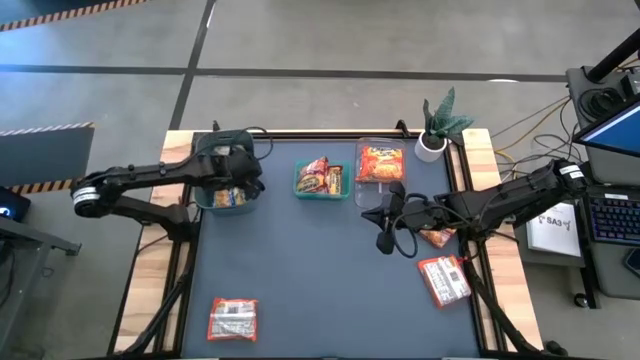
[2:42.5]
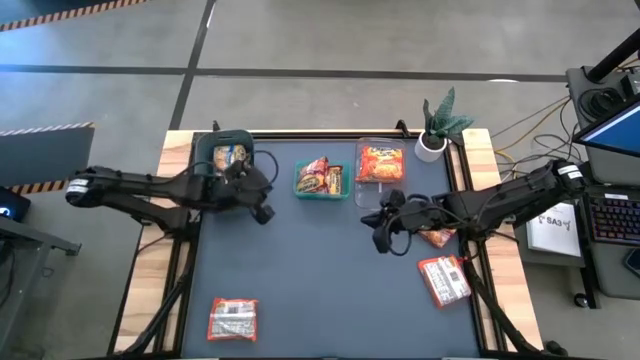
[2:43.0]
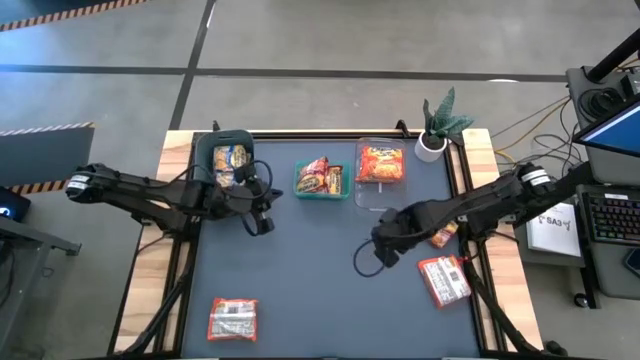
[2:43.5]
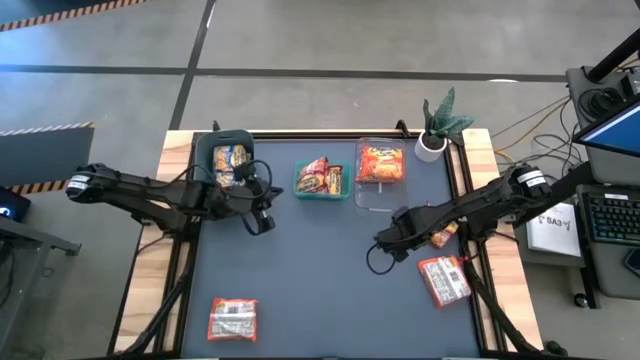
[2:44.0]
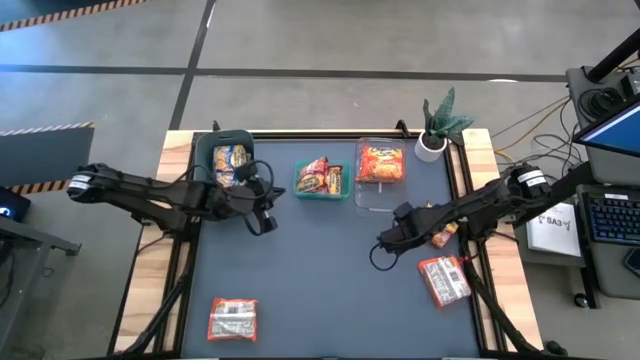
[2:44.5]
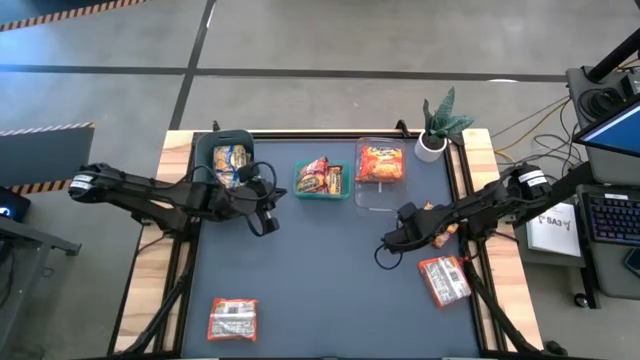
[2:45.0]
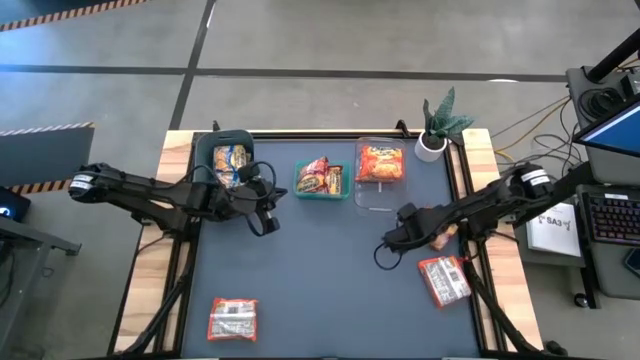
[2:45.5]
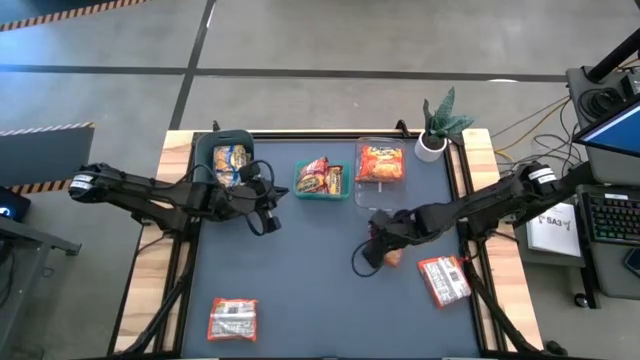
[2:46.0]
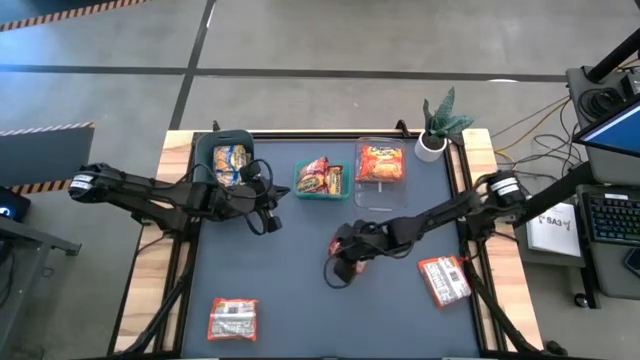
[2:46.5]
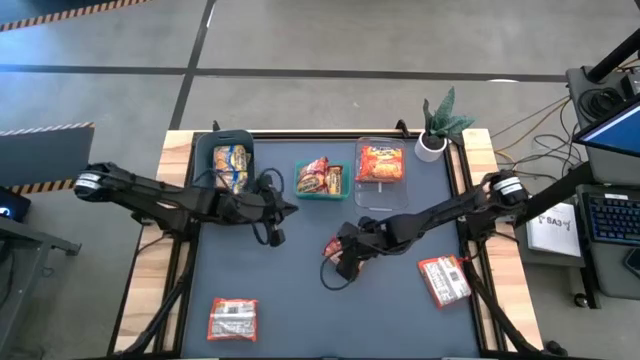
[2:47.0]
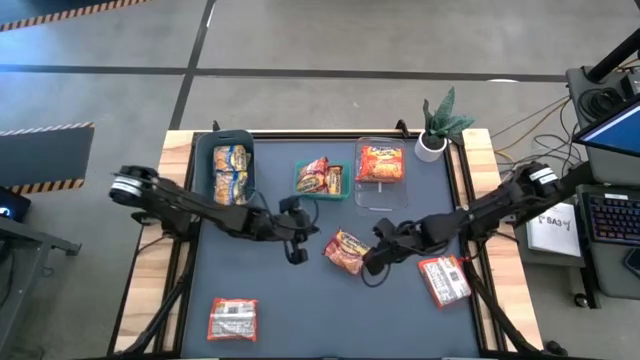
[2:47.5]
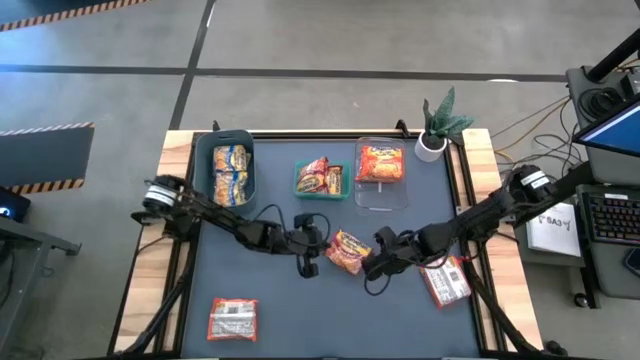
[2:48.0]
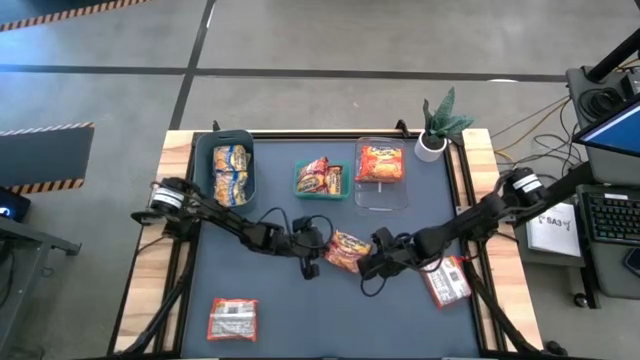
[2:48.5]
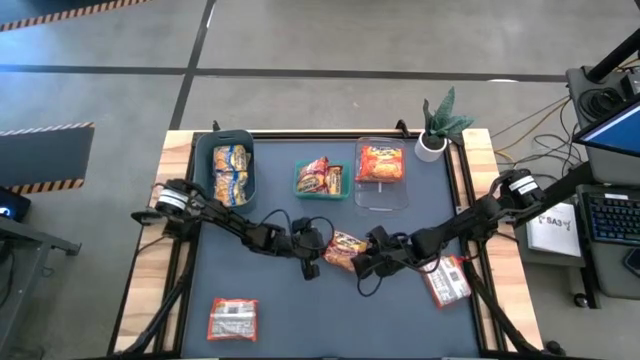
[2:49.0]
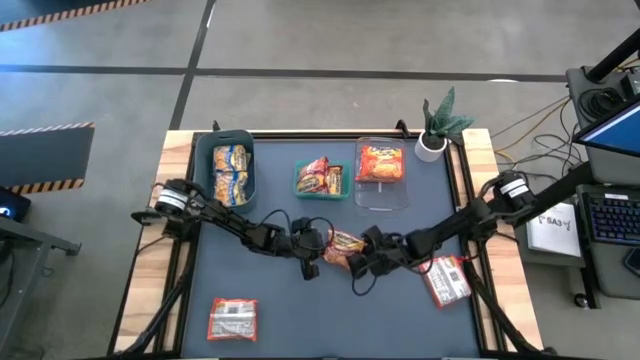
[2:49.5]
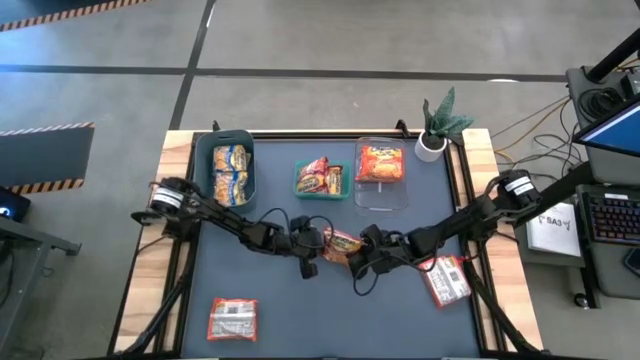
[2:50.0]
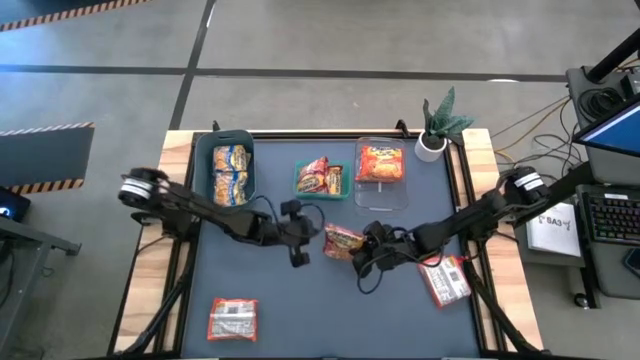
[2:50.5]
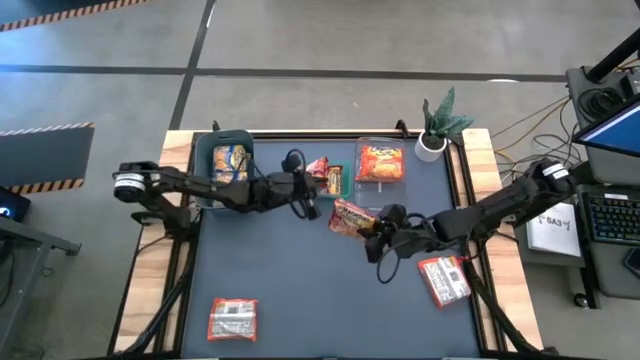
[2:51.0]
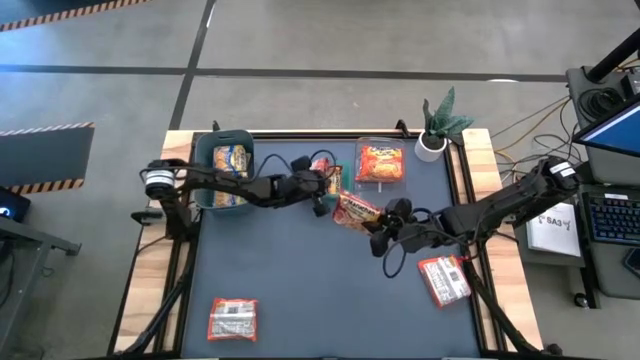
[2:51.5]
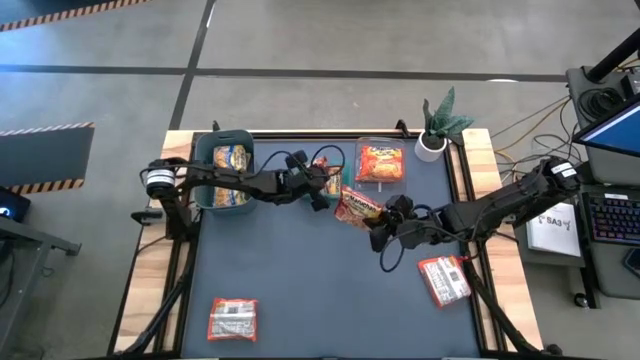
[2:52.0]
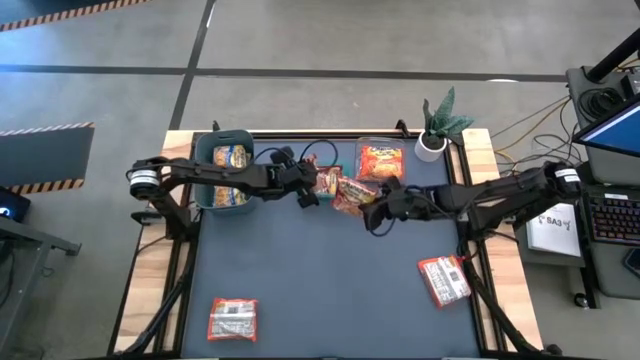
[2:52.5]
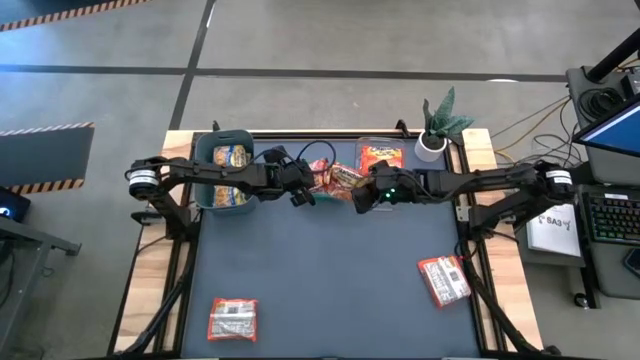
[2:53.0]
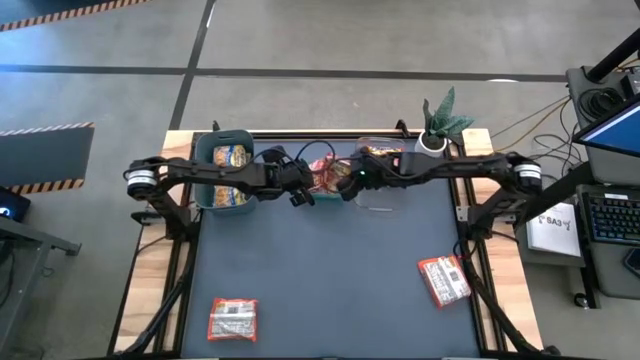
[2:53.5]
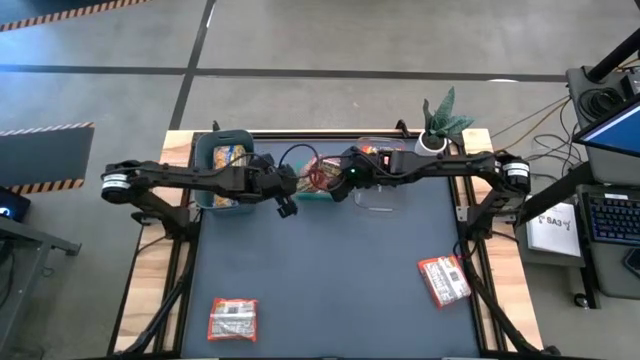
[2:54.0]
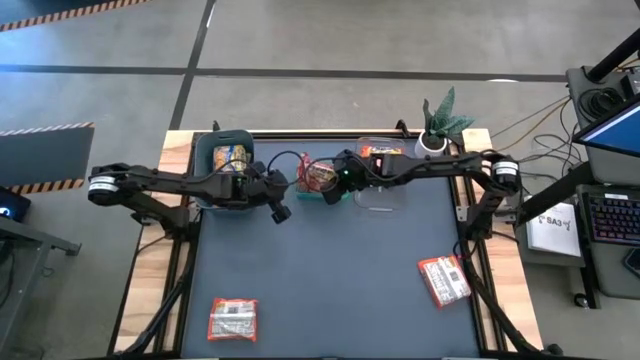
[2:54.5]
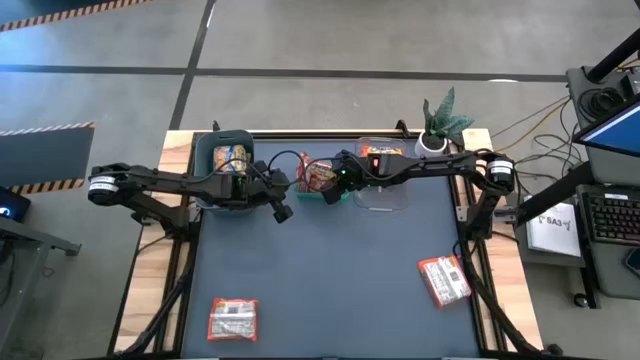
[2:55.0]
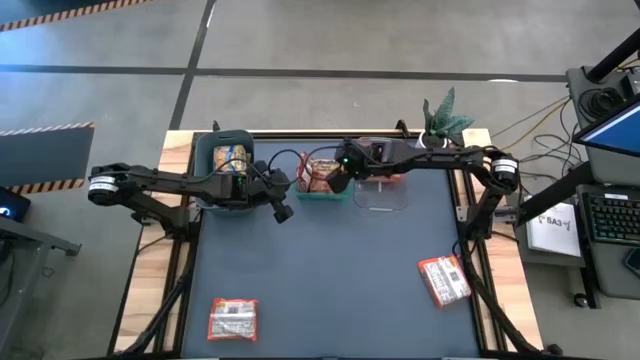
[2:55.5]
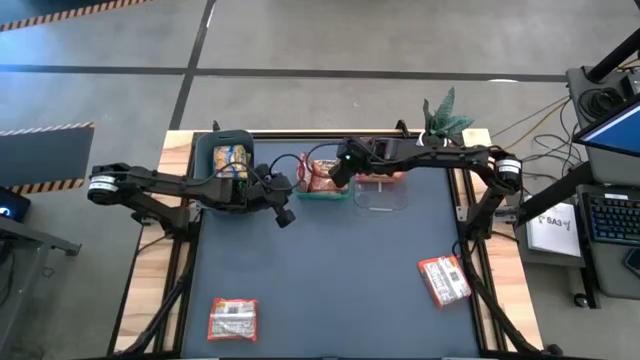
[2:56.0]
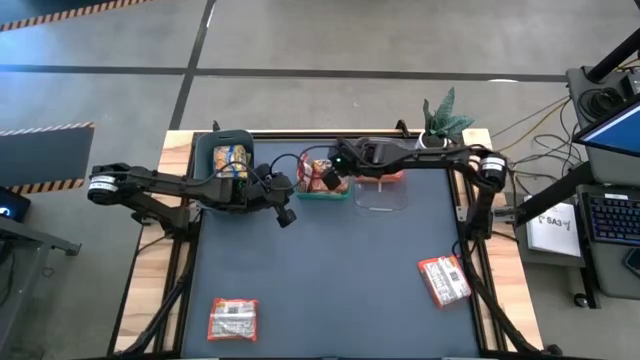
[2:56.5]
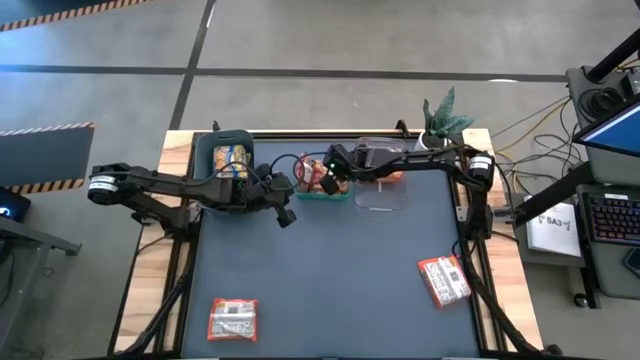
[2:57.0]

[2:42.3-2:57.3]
Task: Sort Maruchan noodles
Put the red noodle pack into the light blue bin

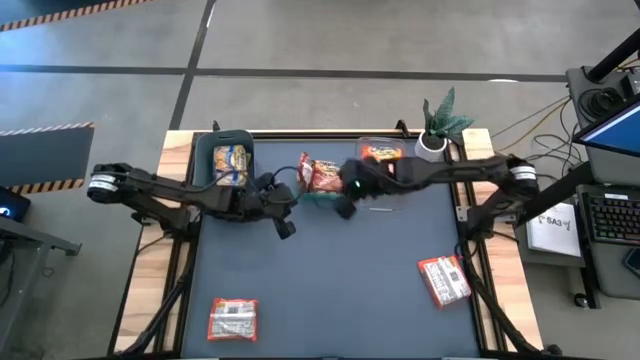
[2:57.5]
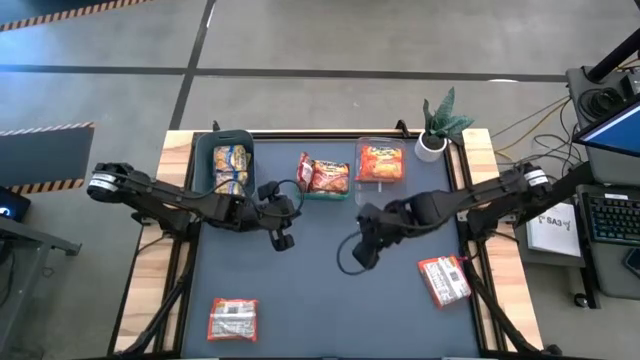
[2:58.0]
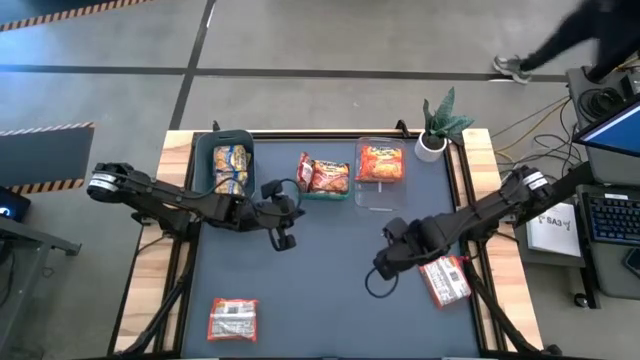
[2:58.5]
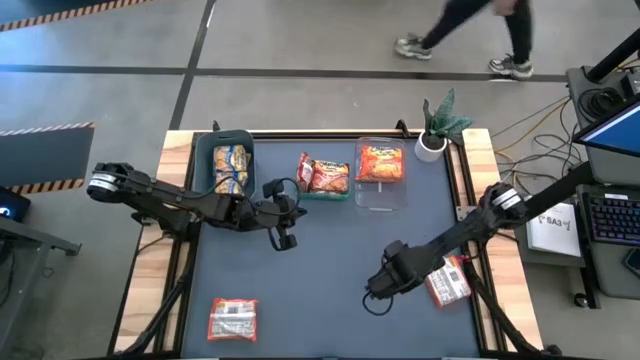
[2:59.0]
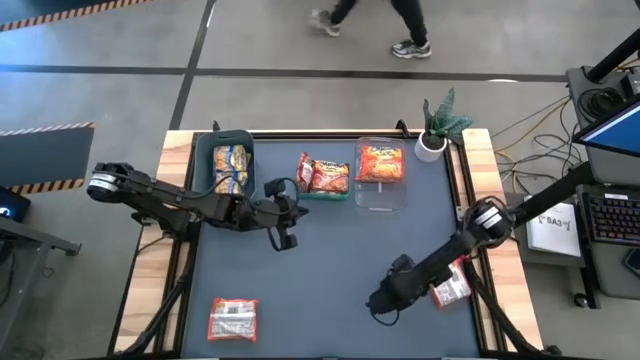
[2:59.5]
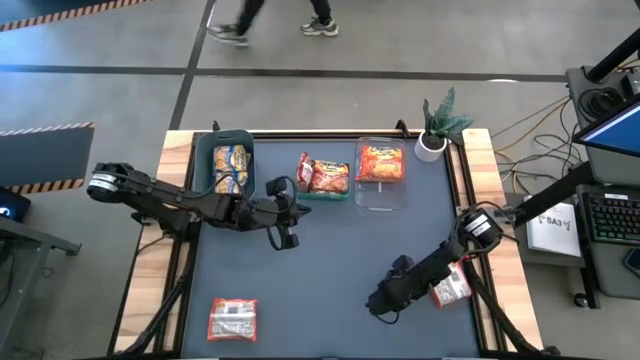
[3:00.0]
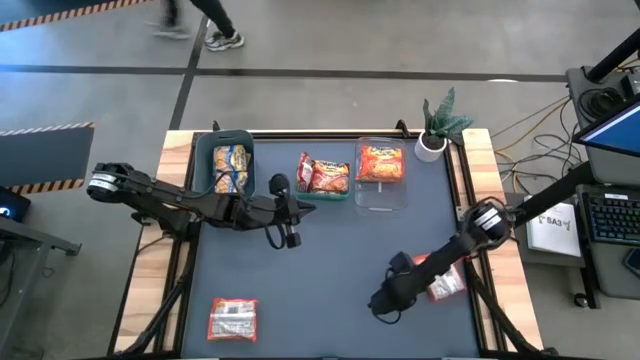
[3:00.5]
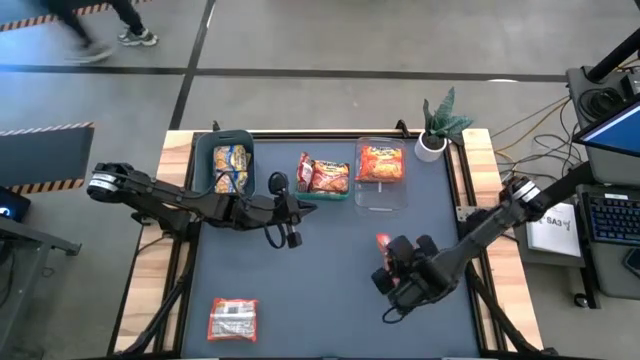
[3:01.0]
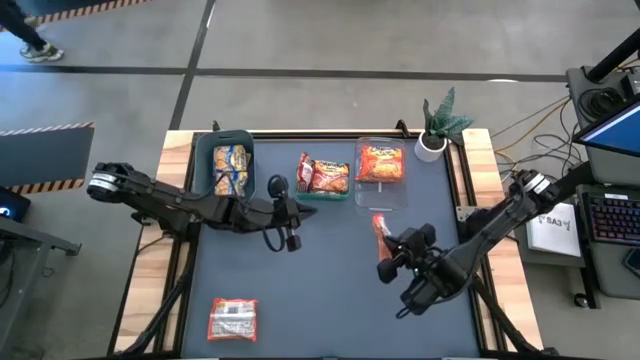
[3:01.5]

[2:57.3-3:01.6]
Put the right orange noodle pack into the transparent bin

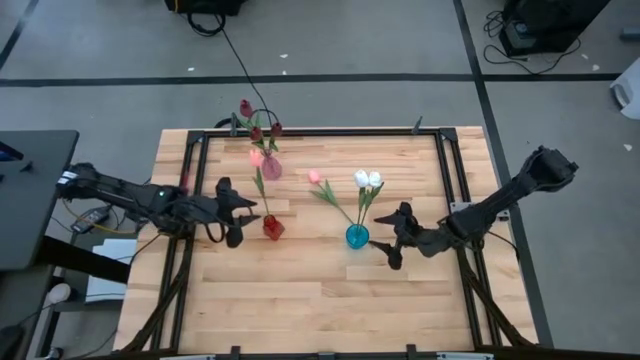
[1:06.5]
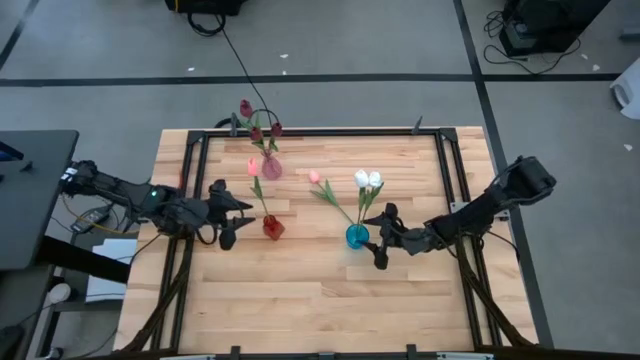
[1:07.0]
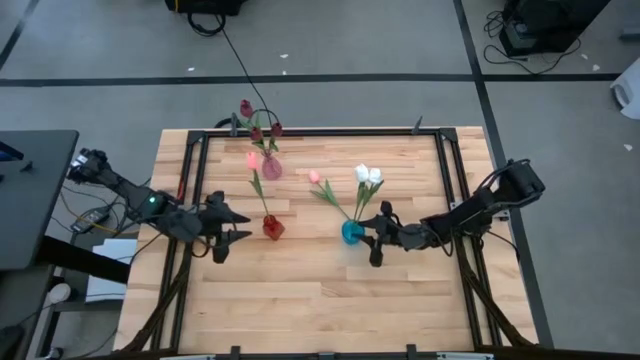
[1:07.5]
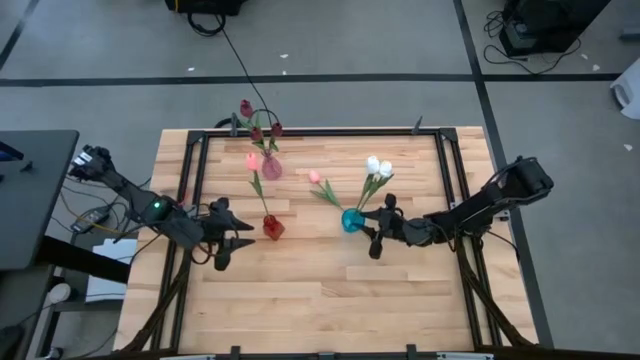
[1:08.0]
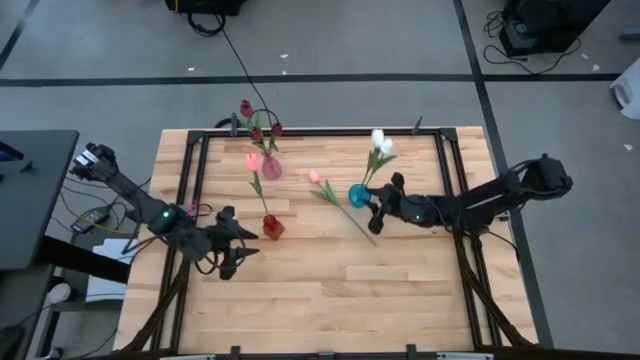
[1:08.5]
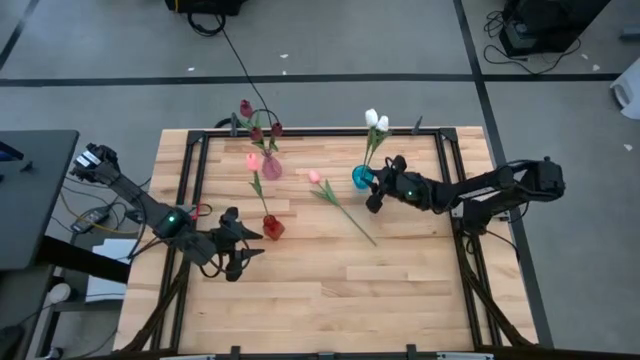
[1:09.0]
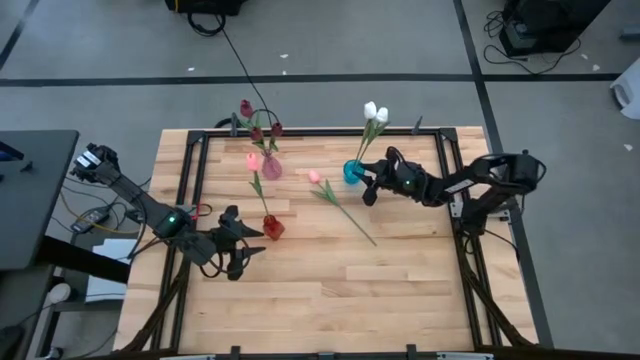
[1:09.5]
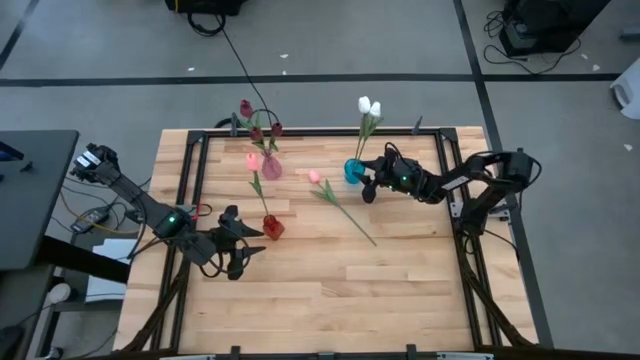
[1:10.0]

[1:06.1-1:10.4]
Task: Sort flowers into vase by color
Move the blue vase to the top right of the table
